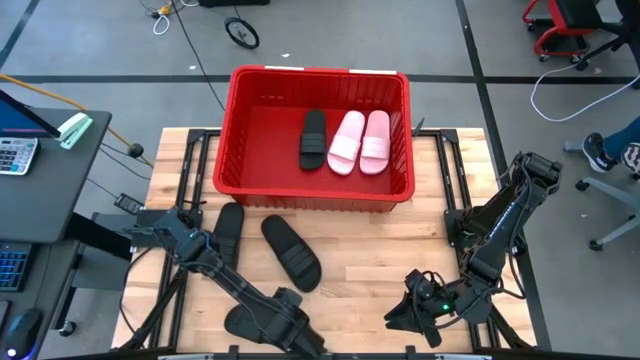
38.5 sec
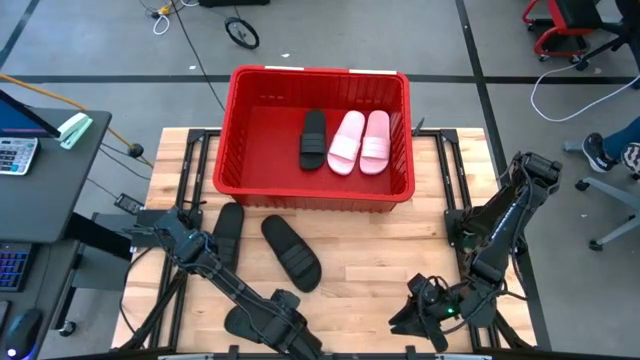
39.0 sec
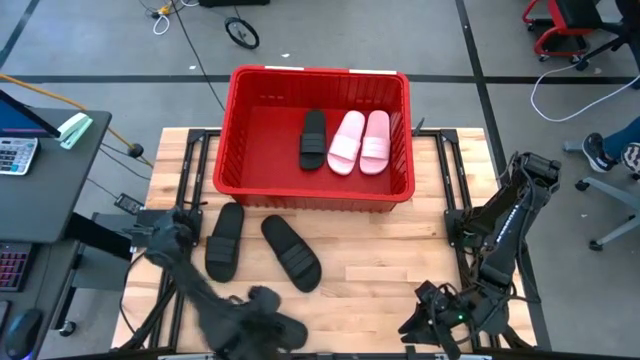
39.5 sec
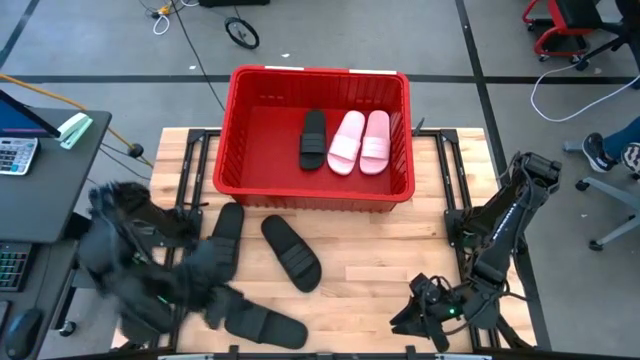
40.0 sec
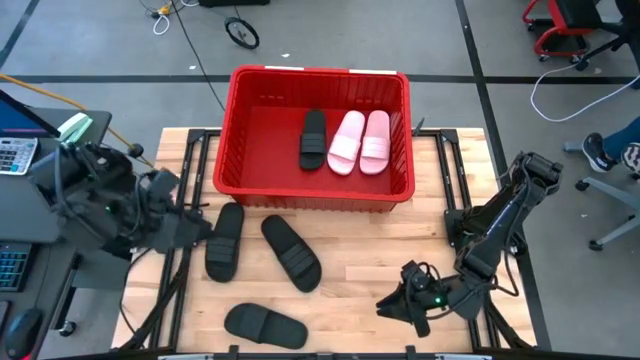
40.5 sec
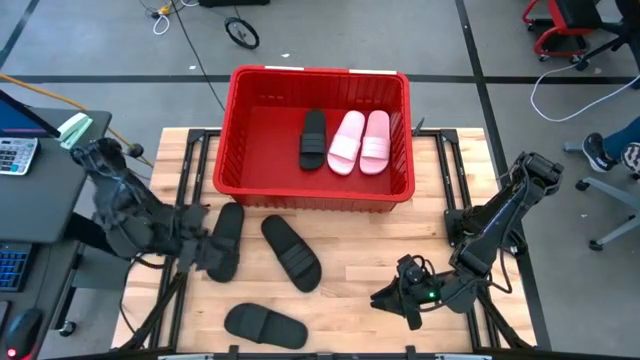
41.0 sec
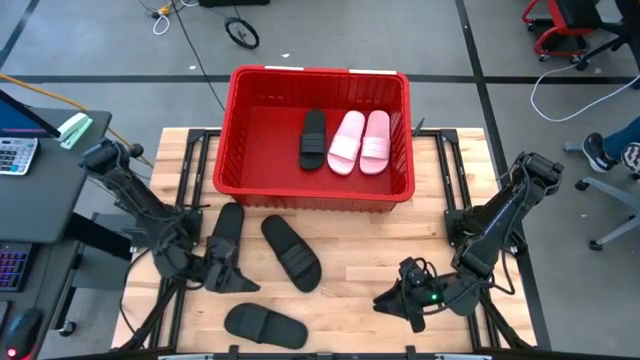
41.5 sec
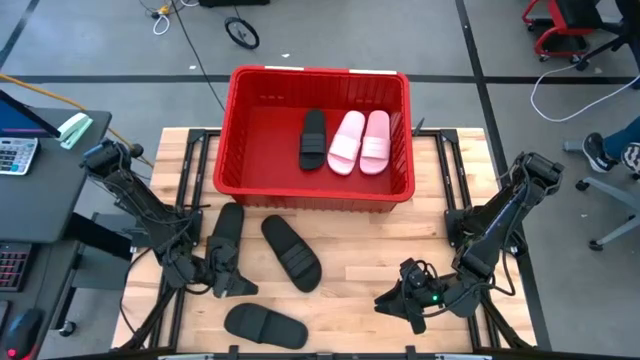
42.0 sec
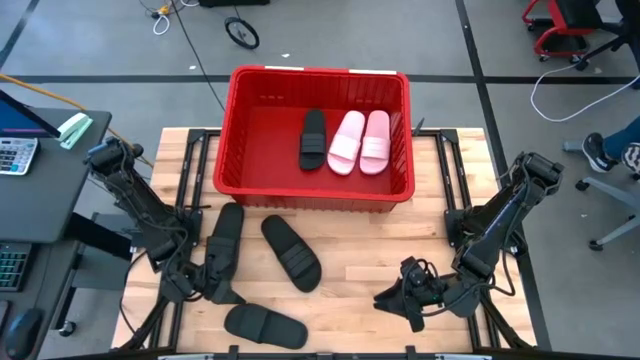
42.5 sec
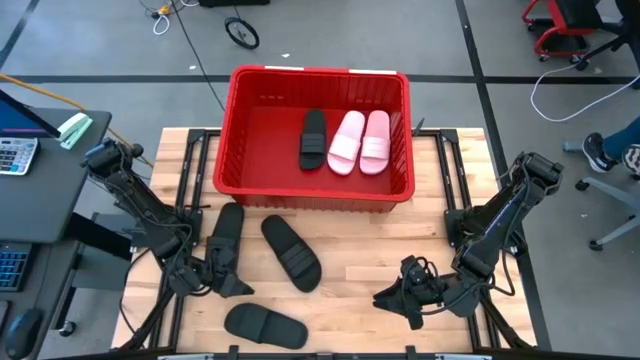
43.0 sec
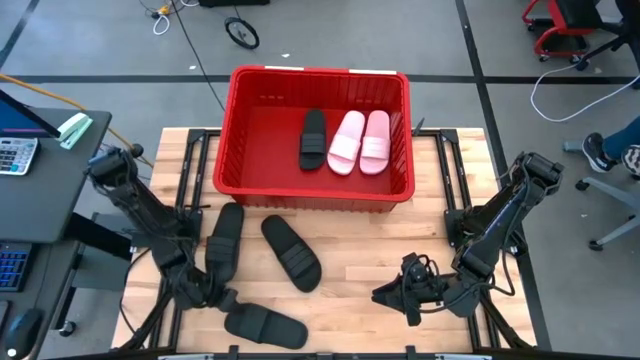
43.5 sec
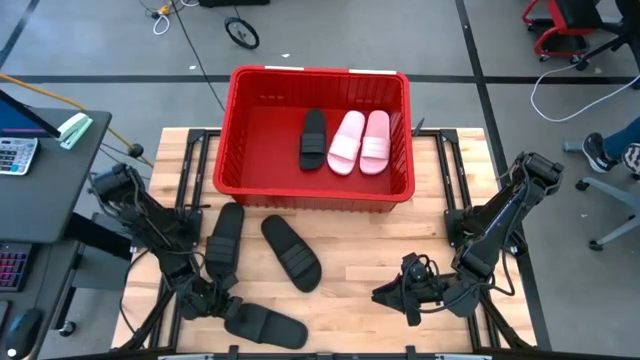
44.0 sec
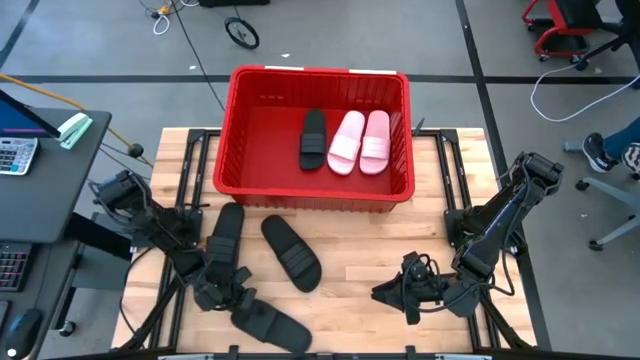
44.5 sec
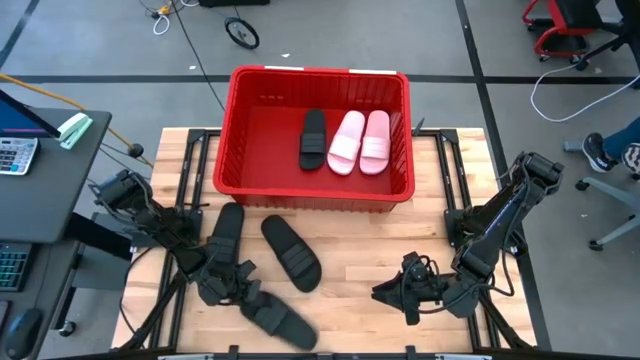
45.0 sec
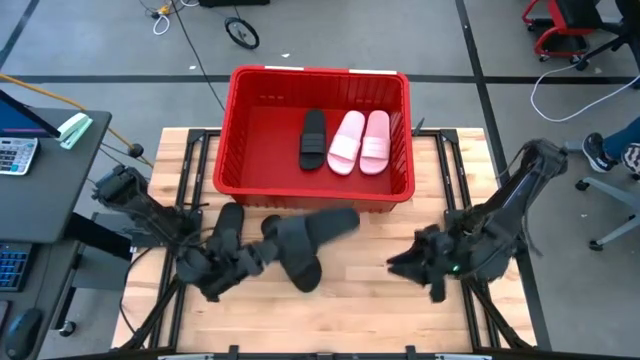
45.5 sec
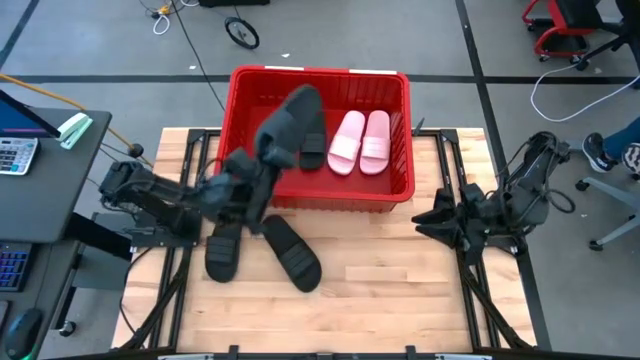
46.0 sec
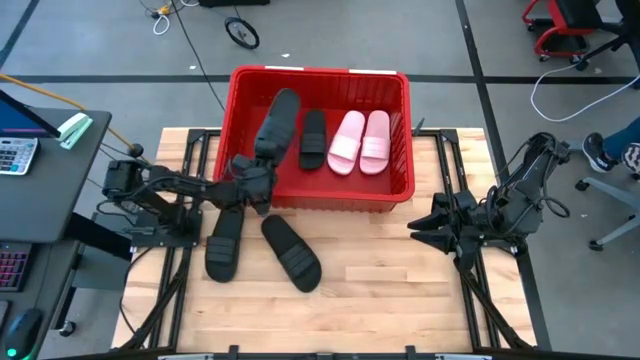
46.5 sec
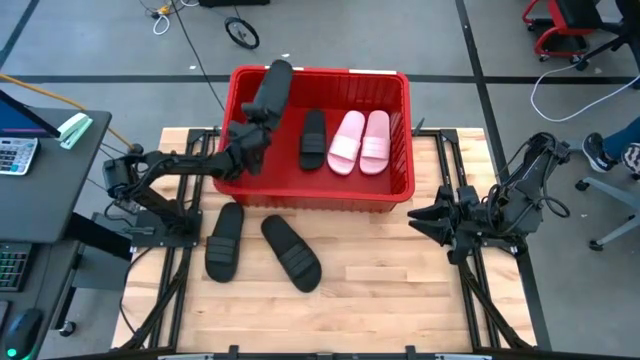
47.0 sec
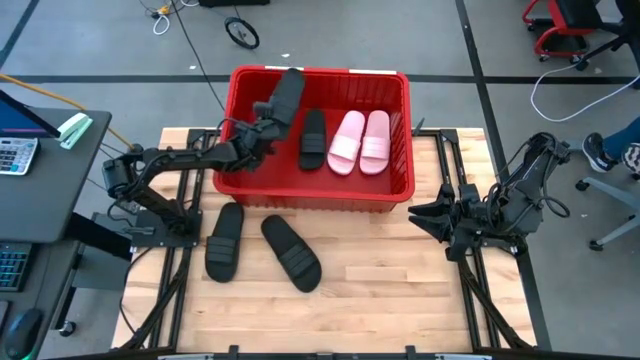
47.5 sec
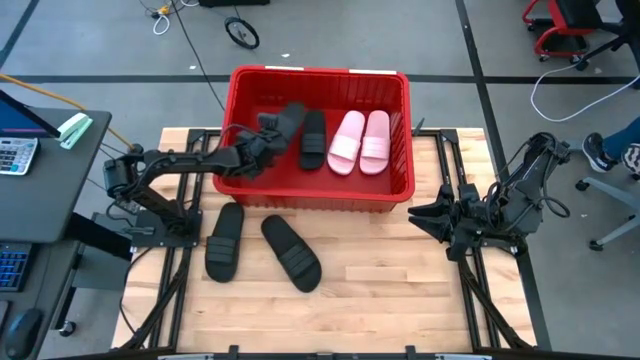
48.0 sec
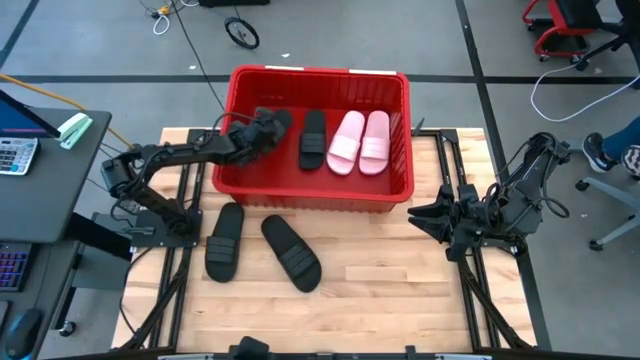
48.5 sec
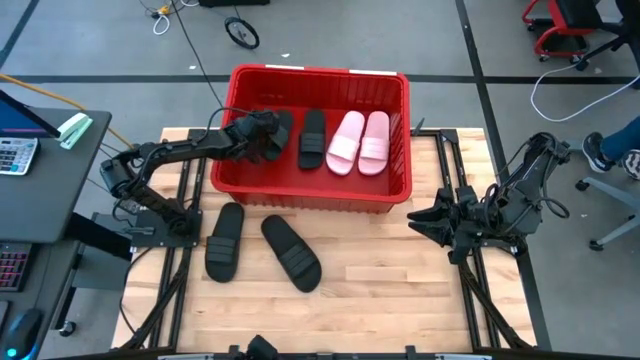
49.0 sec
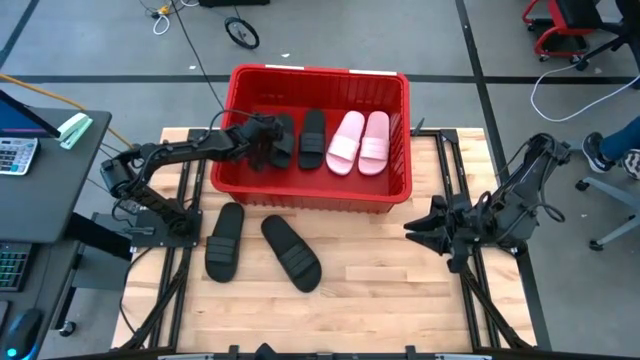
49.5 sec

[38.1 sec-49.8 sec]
Task: Pick and place slides into bin
Put the black slide into the red bin

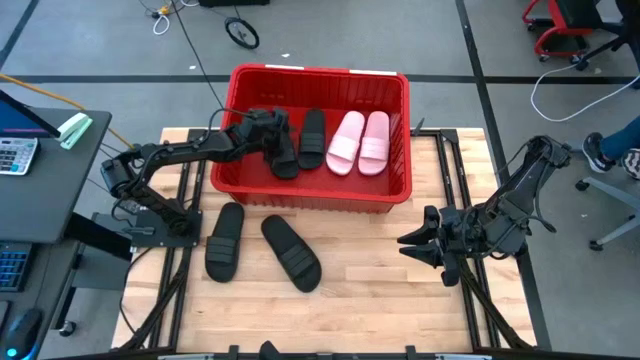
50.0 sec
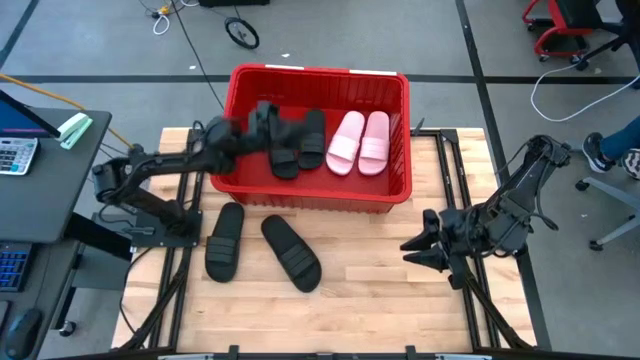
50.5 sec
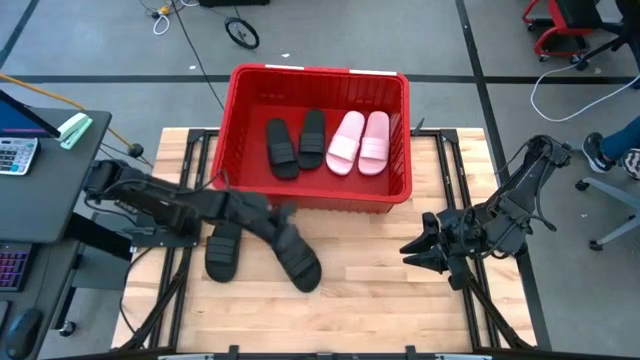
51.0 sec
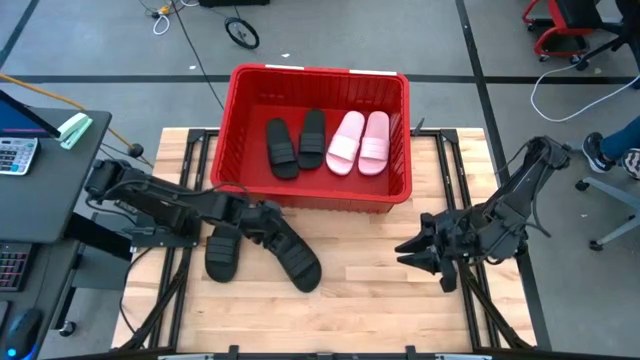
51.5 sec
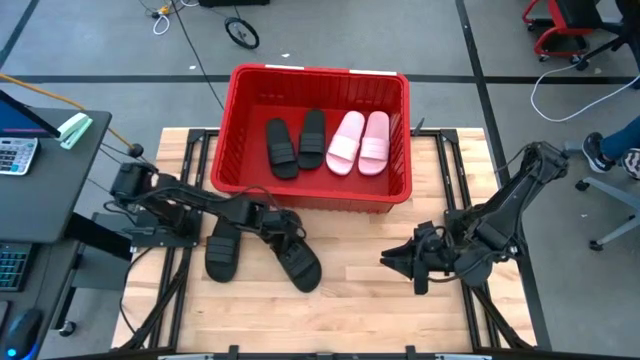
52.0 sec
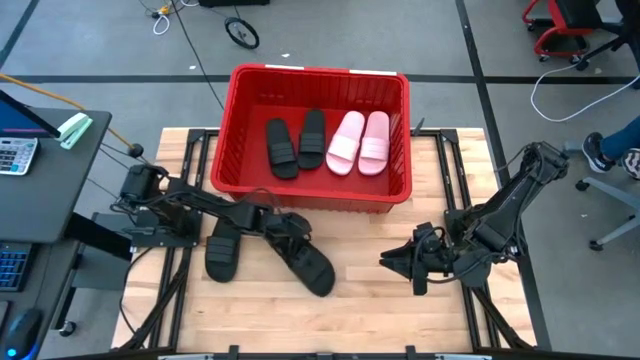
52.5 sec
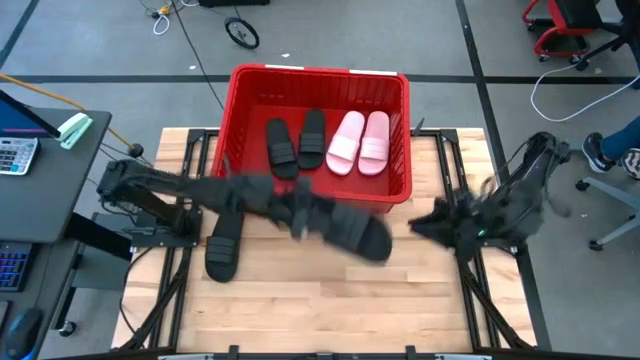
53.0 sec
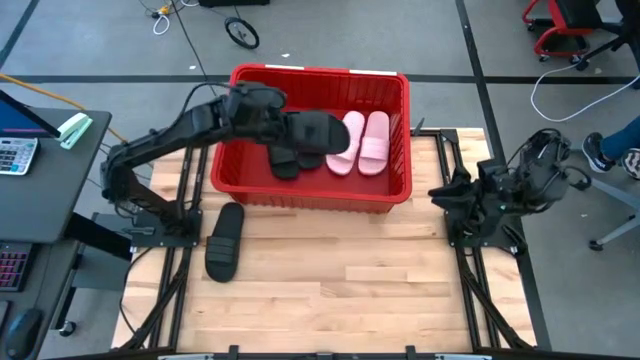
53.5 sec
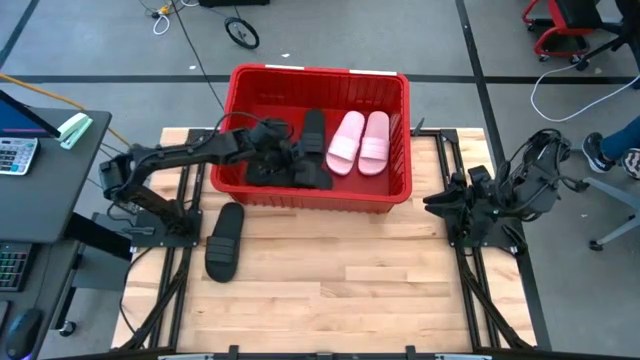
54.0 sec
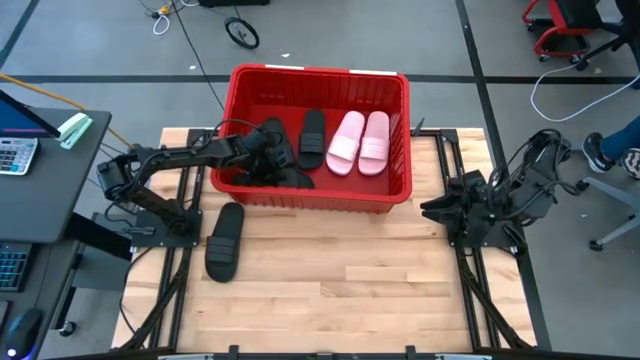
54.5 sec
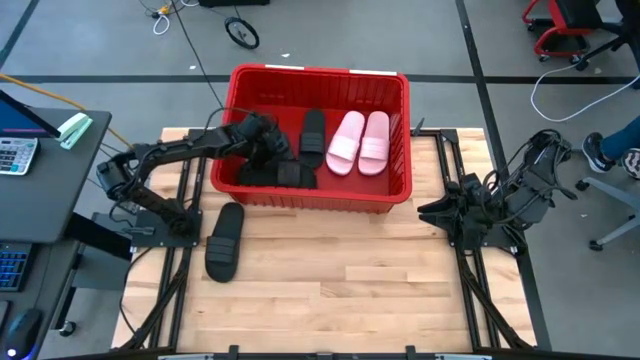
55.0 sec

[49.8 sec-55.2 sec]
Put the black slide into the red bin

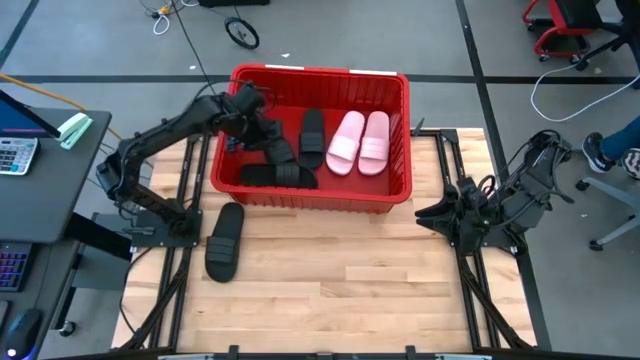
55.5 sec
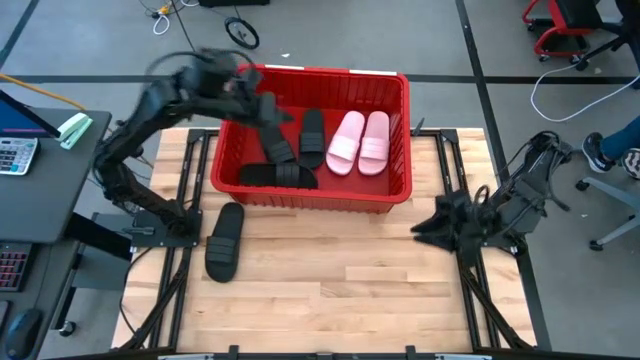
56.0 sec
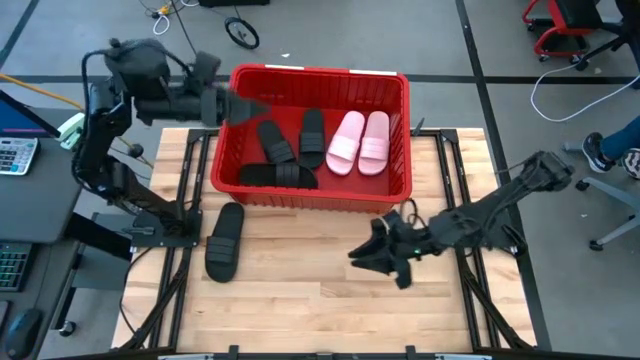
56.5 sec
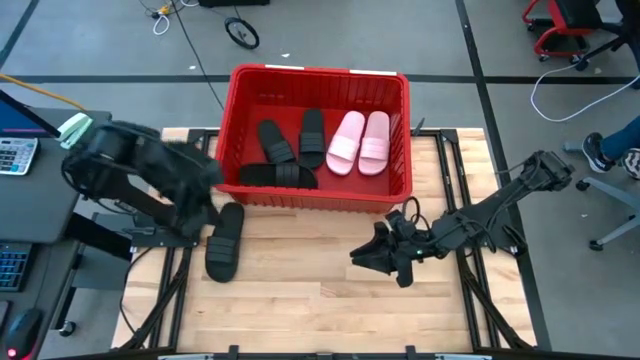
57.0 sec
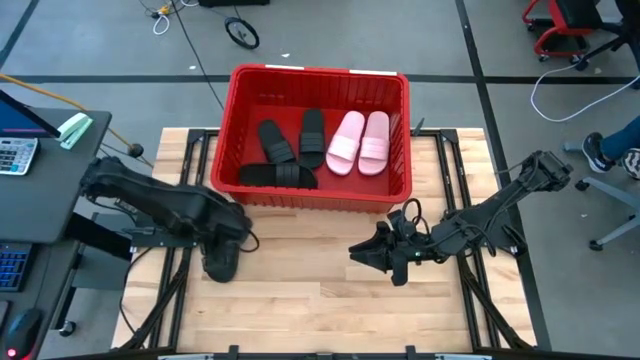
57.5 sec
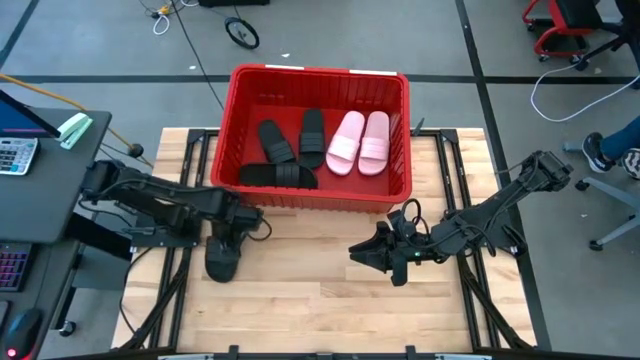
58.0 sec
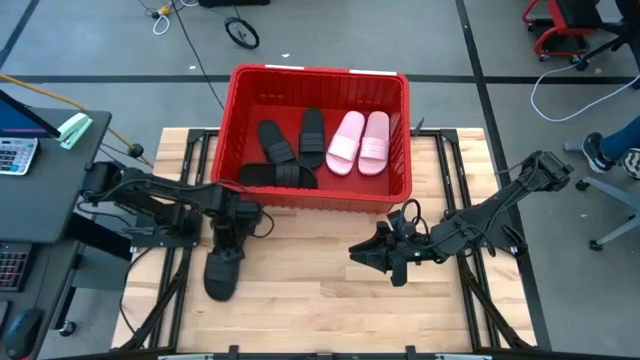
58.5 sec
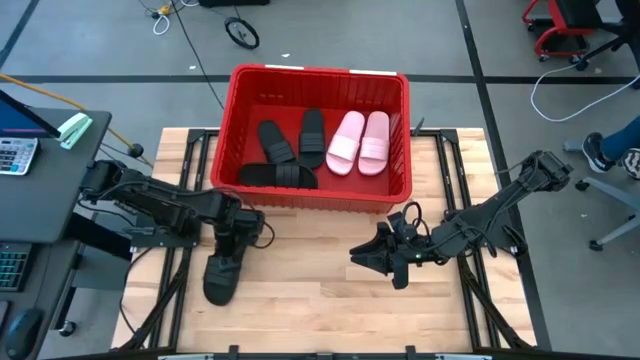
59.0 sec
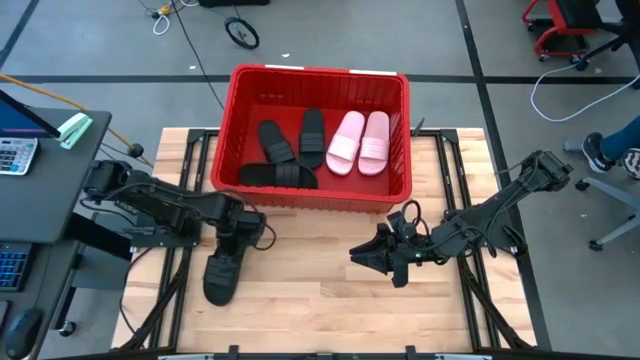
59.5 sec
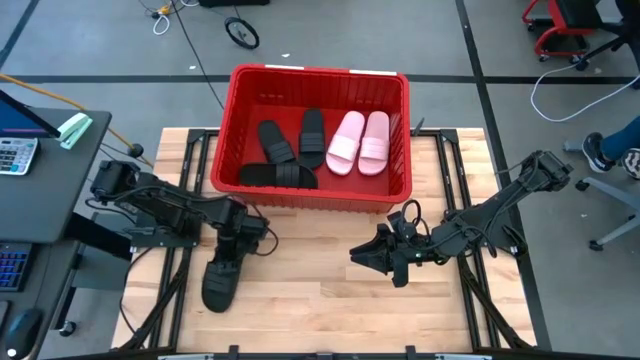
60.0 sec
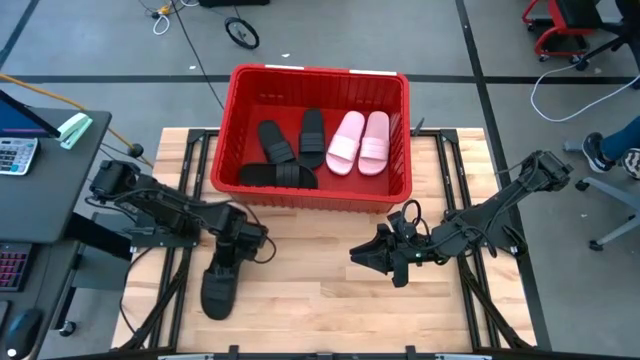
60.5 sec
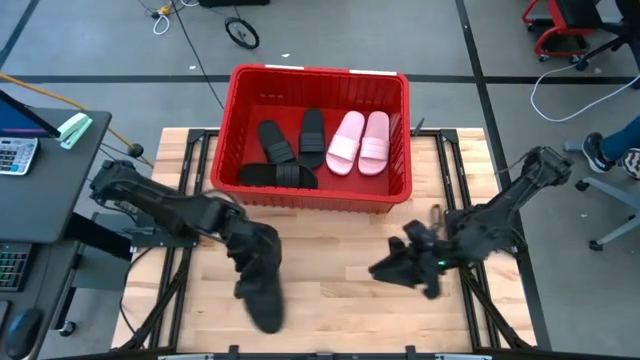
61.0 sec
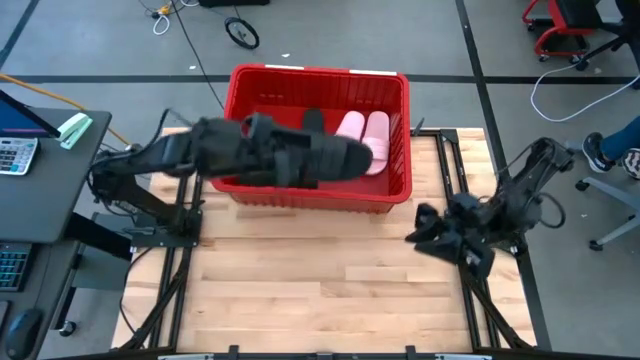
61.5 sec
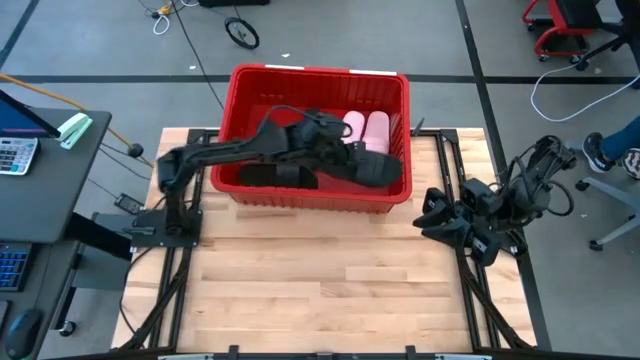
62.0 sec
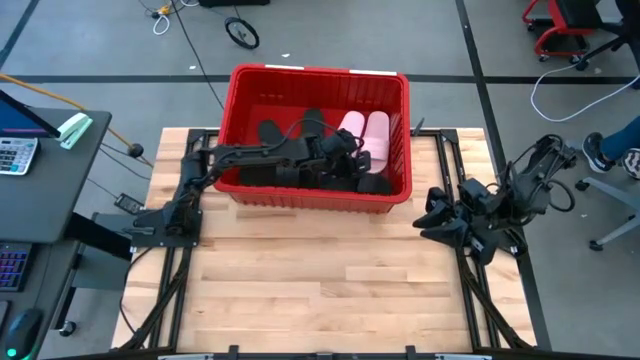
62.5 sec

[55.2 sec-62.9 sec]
Put the black slide into the red bin
